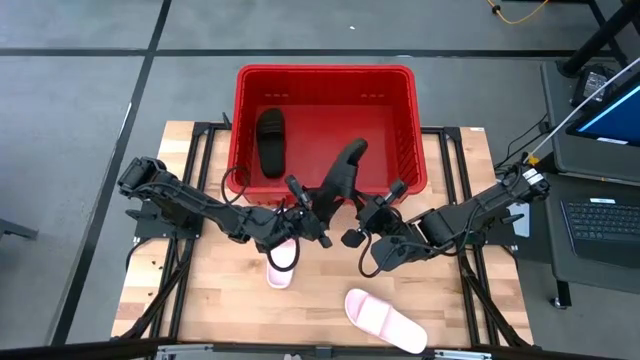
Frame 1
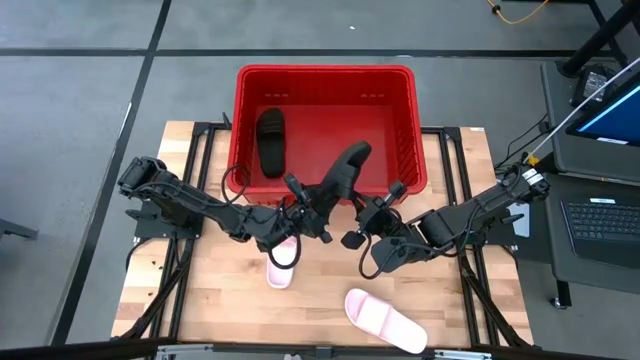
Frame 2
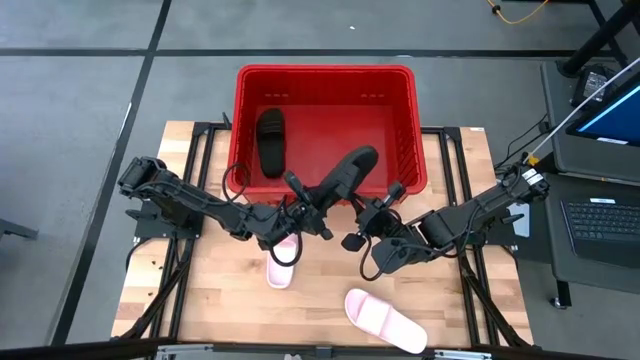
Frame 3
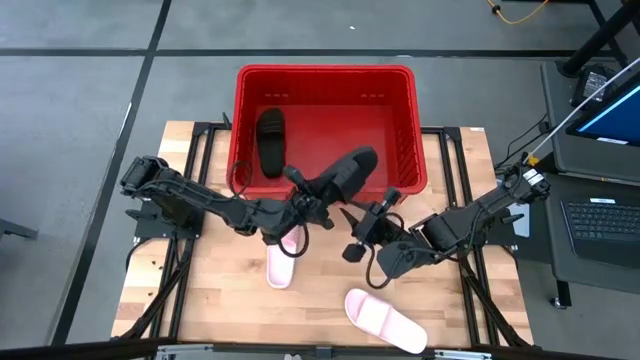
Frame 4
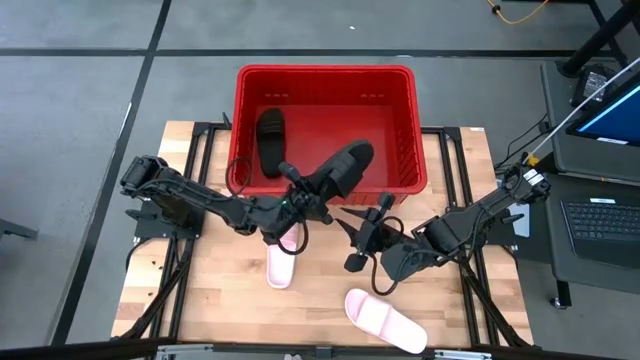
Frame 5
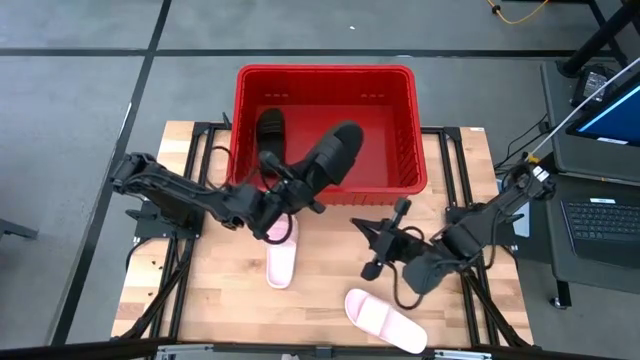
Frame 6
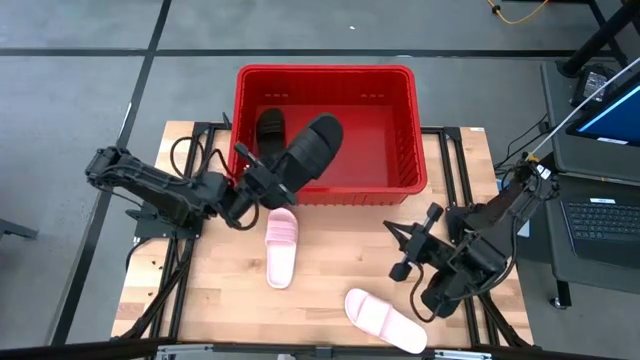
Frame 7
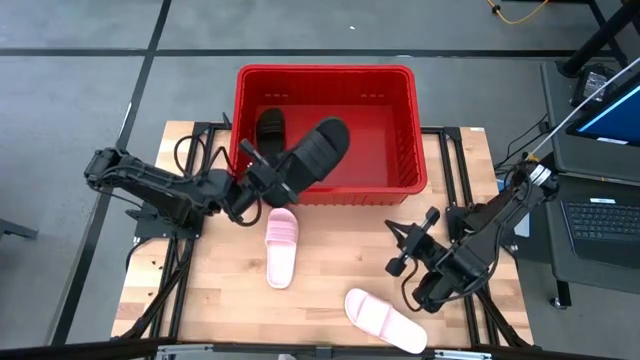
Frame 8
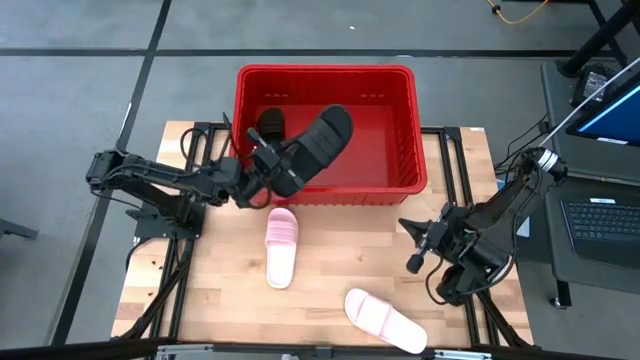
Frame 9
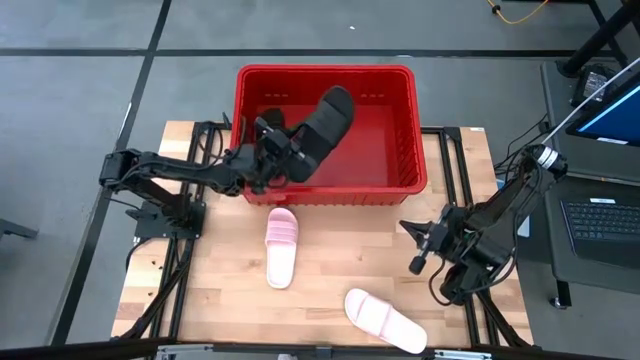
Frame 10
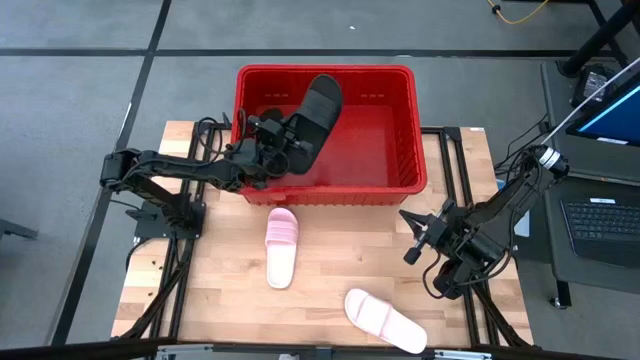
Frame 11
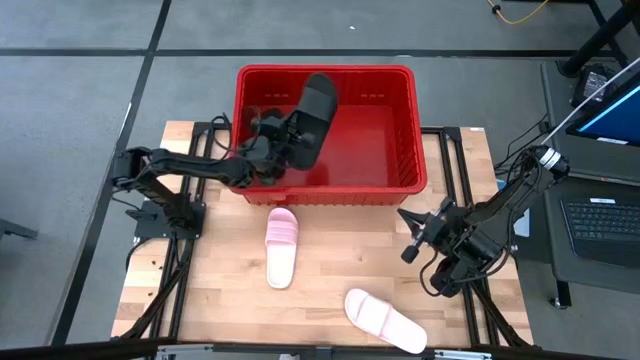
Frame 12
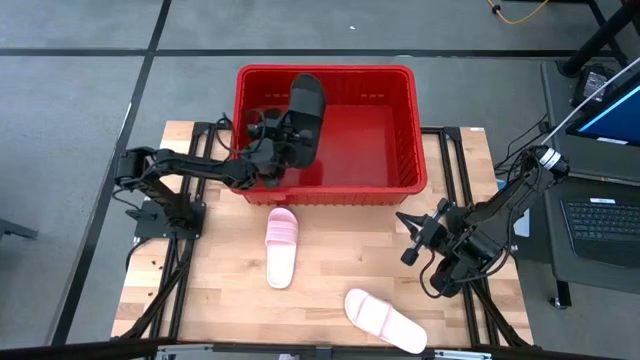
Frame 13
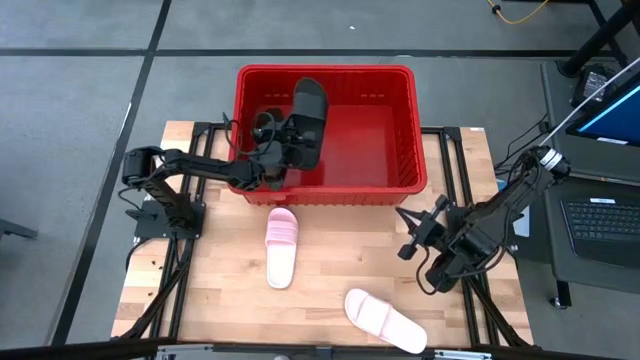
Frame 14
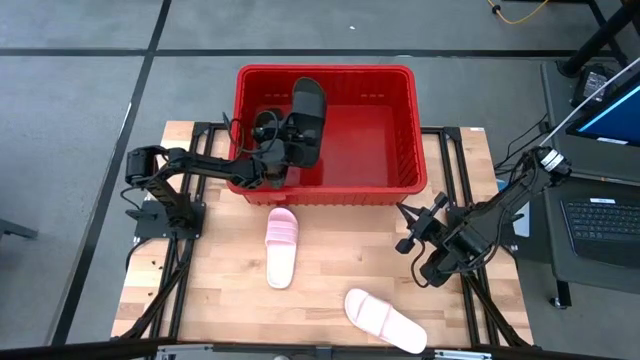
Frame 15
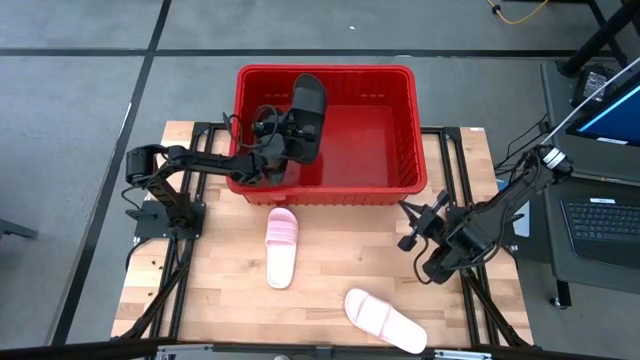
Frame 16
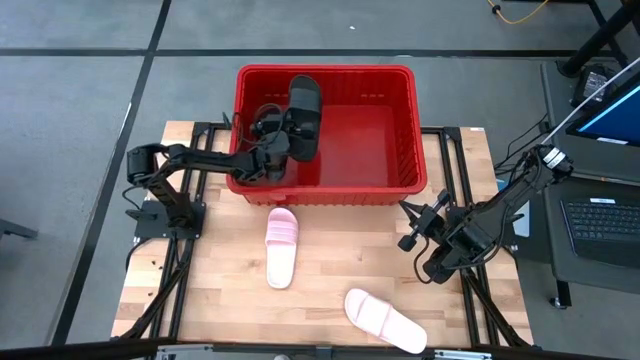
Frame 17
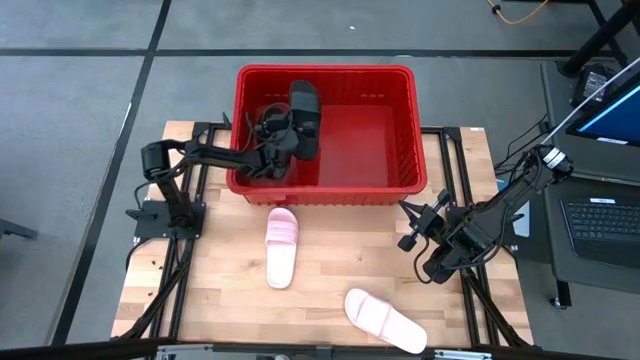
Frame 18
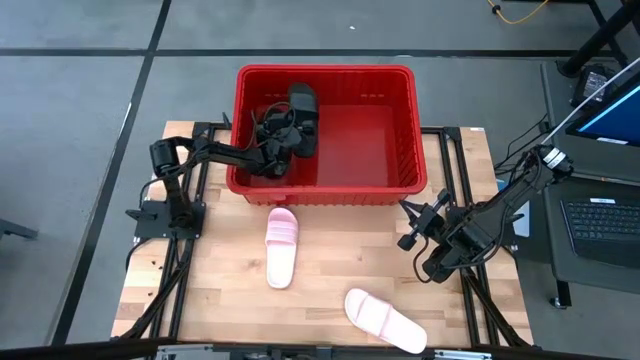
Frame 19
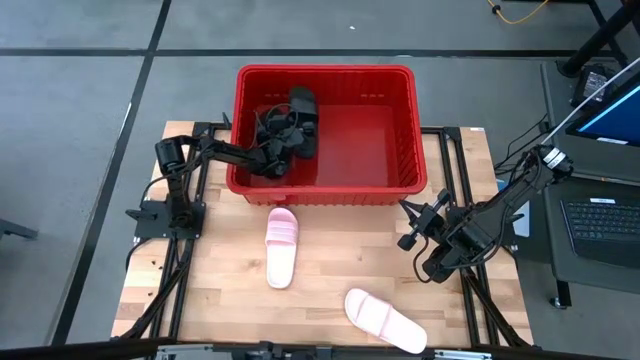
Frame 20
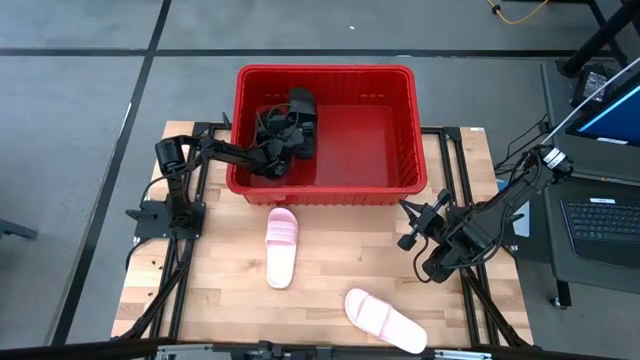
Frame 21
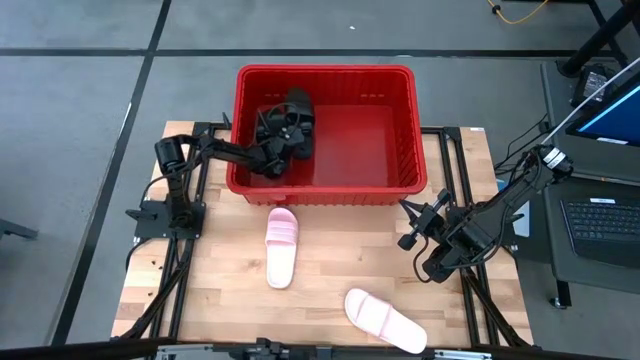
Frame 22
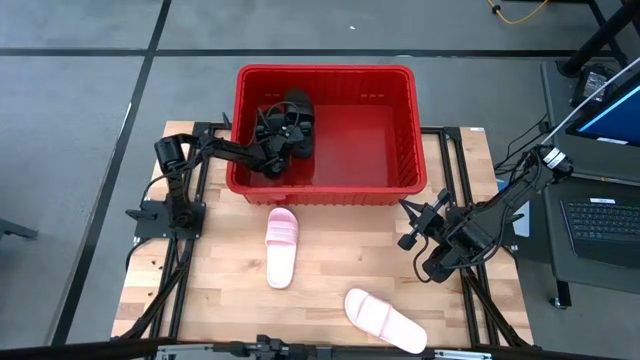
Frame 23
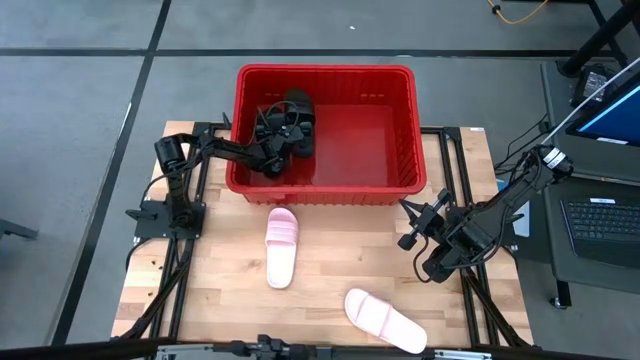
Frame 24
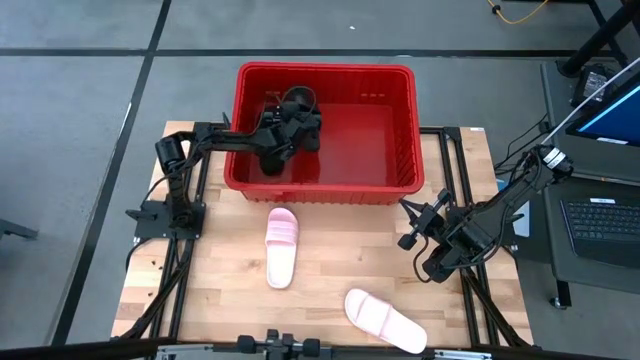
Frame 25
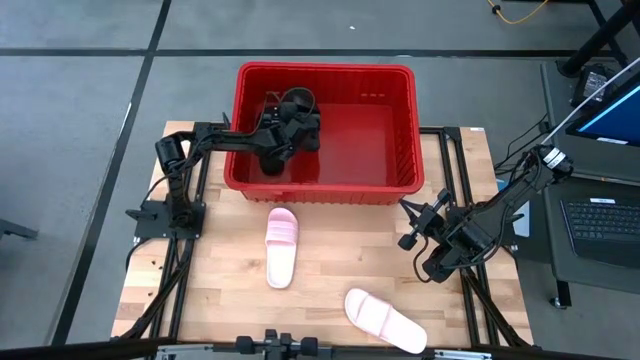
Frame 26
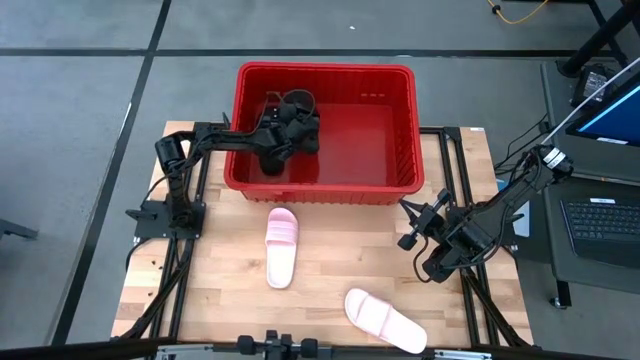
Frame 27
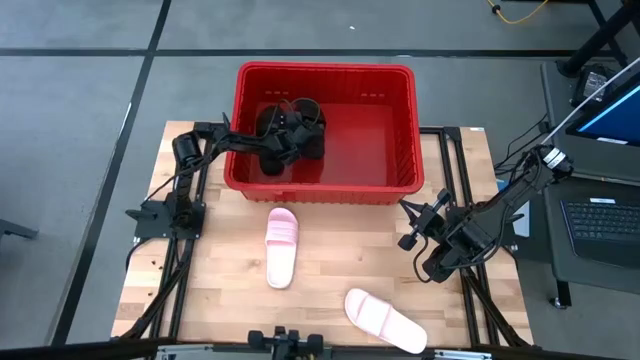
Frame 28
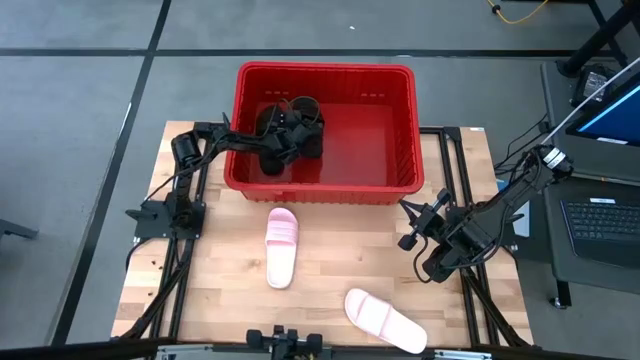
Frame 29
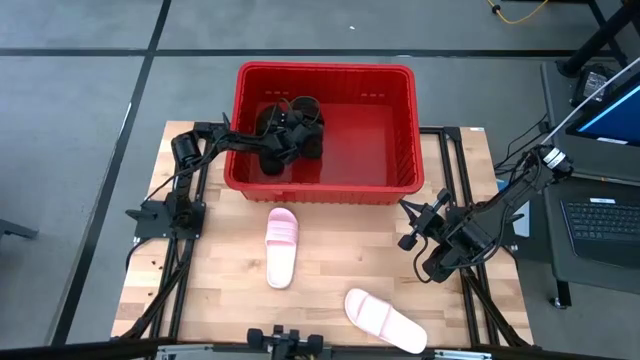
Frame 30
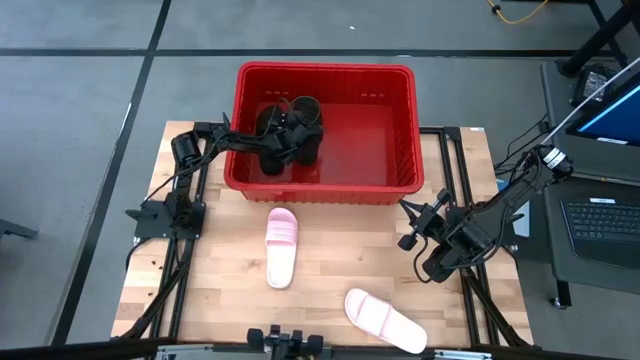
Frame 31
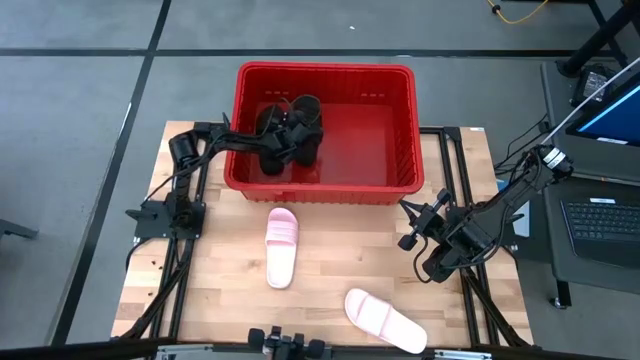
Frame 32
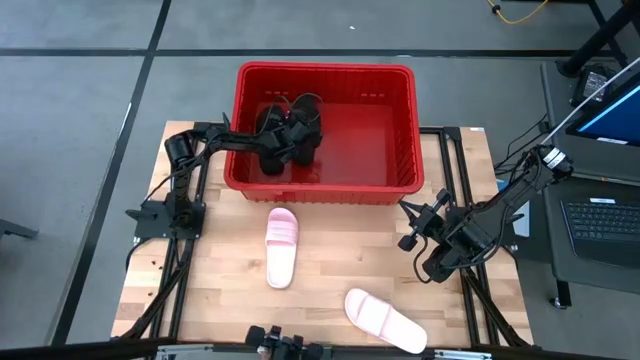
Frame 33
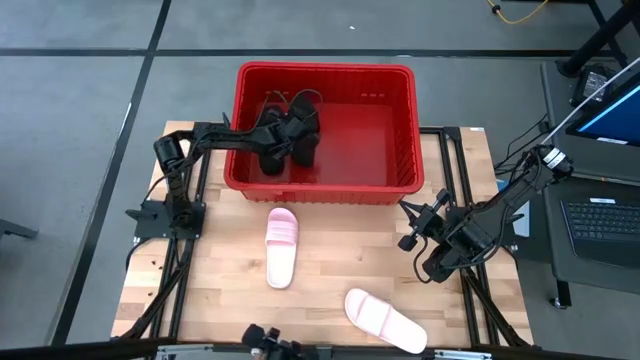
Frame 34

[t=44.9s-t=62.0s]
Task: Pick and place slides into bin
Put the black slipper into the red bin
